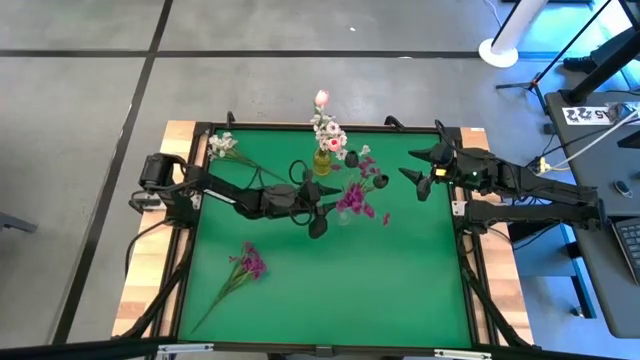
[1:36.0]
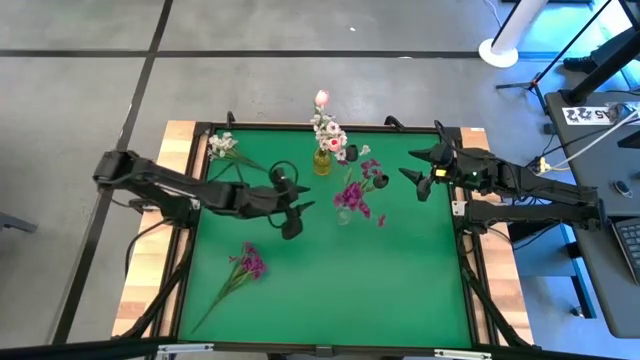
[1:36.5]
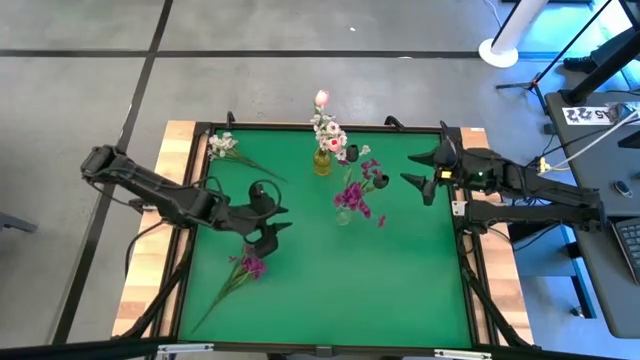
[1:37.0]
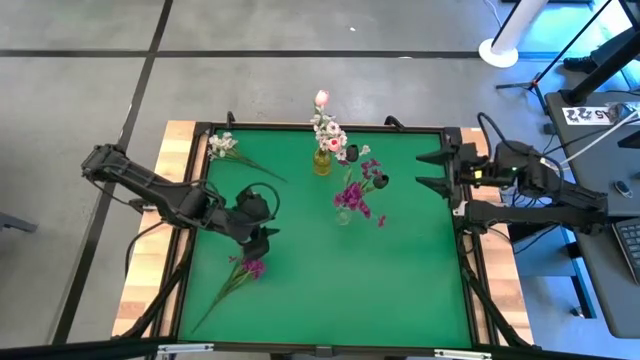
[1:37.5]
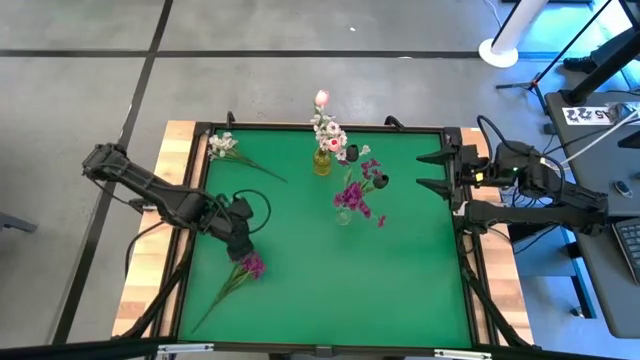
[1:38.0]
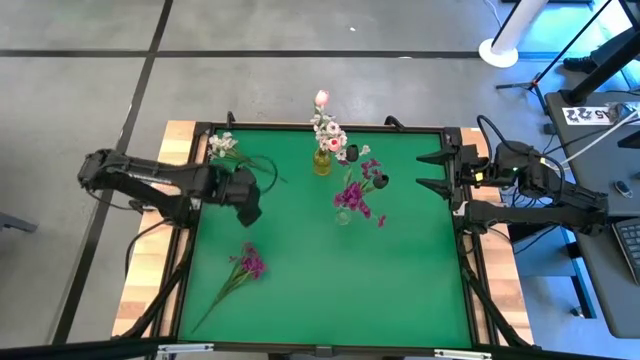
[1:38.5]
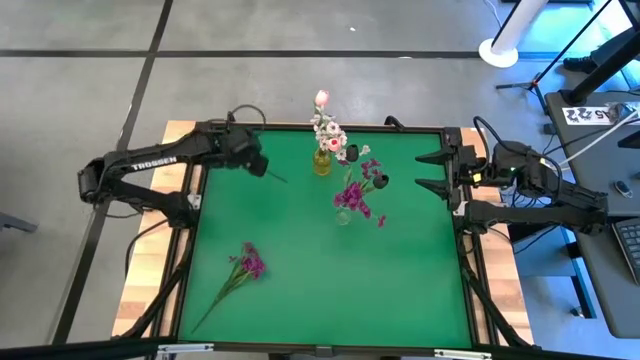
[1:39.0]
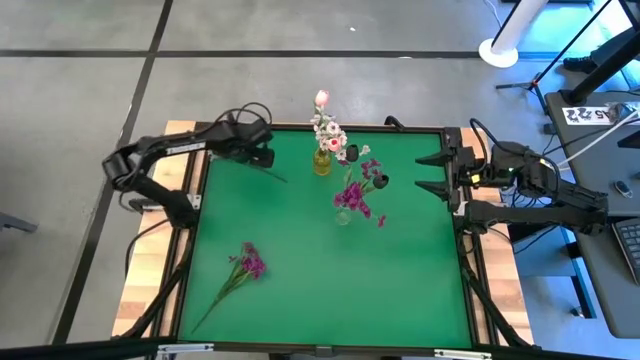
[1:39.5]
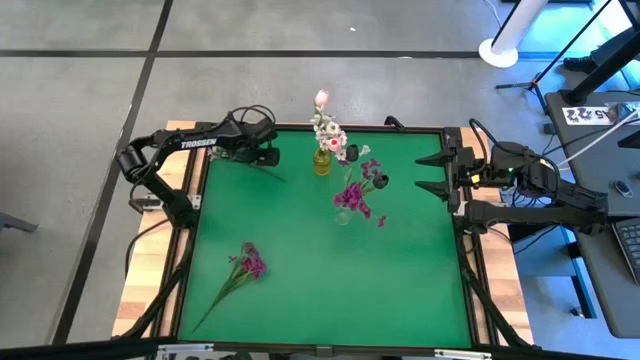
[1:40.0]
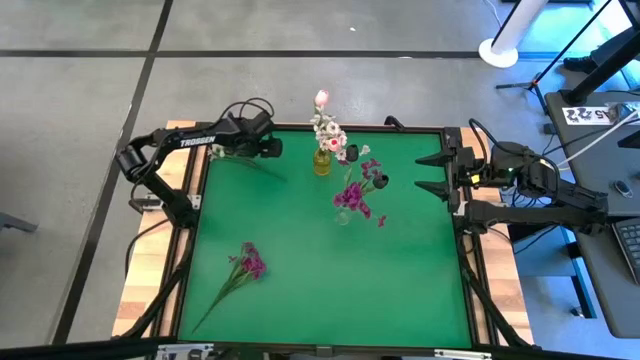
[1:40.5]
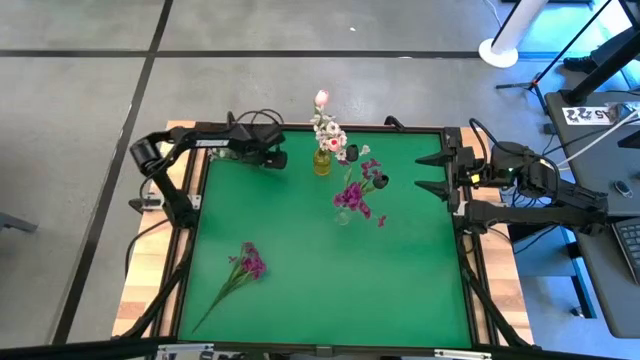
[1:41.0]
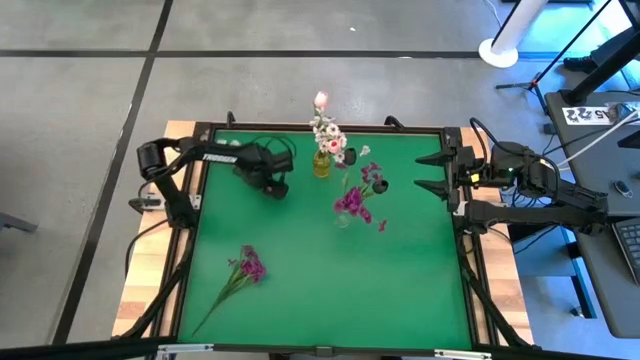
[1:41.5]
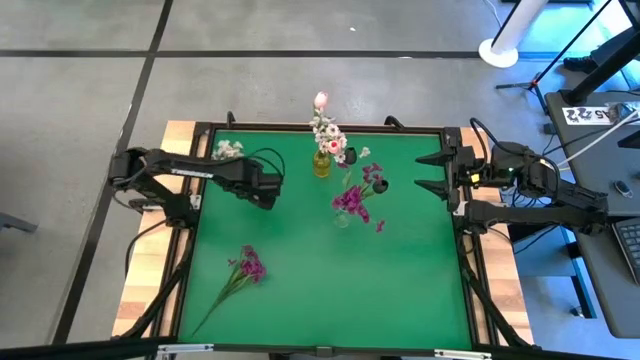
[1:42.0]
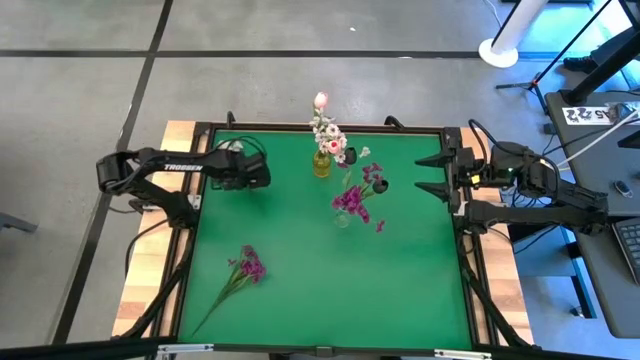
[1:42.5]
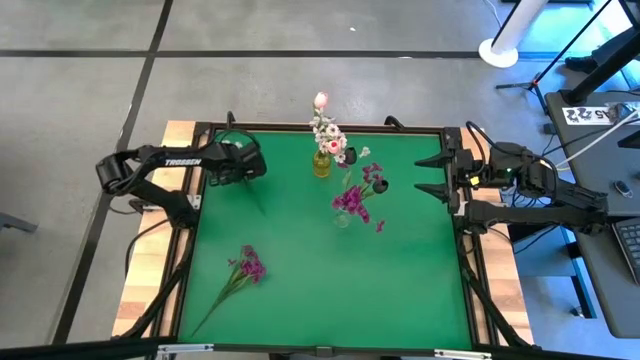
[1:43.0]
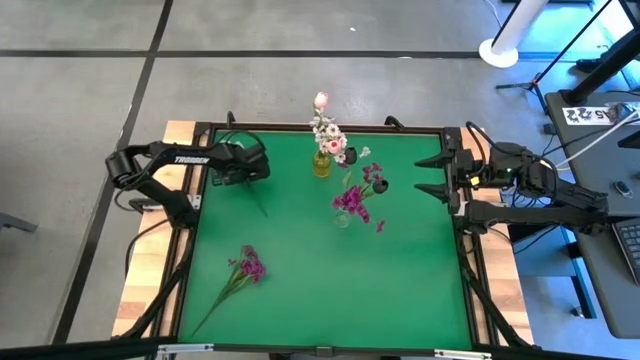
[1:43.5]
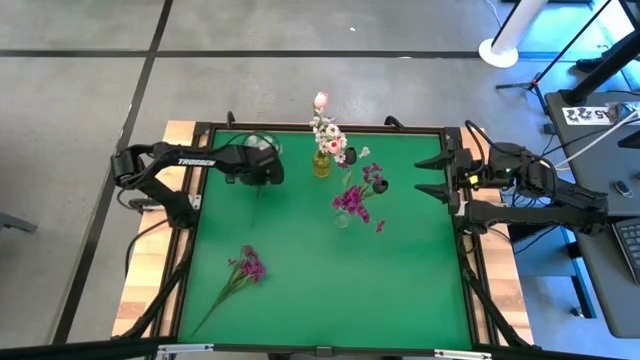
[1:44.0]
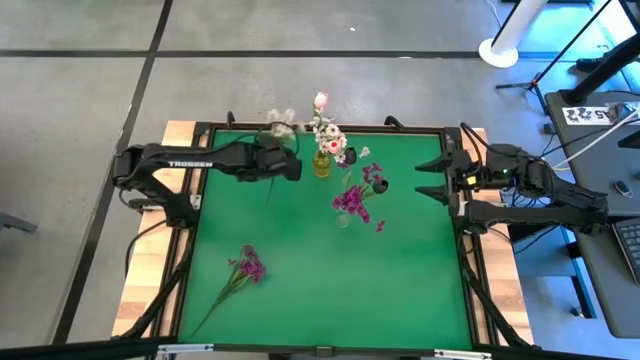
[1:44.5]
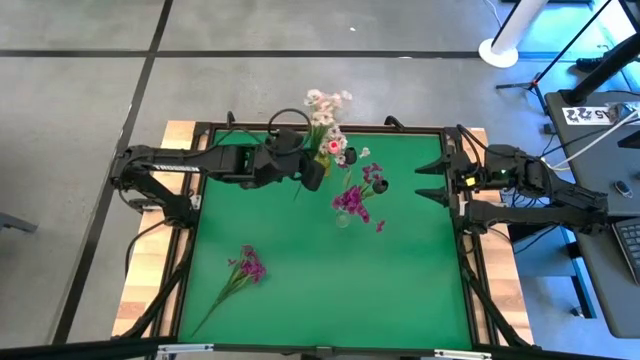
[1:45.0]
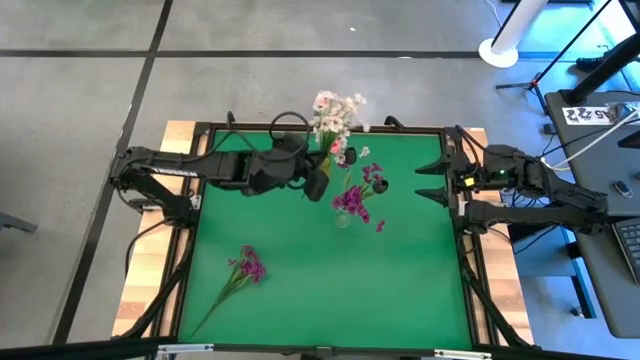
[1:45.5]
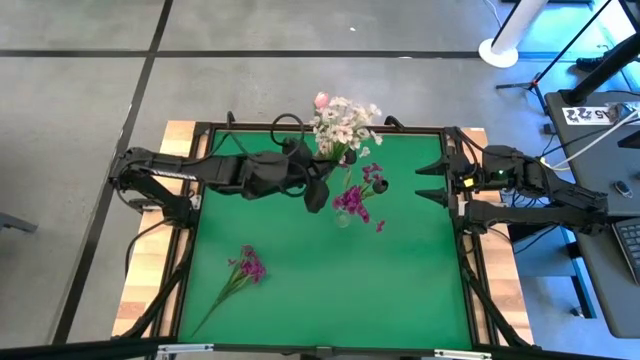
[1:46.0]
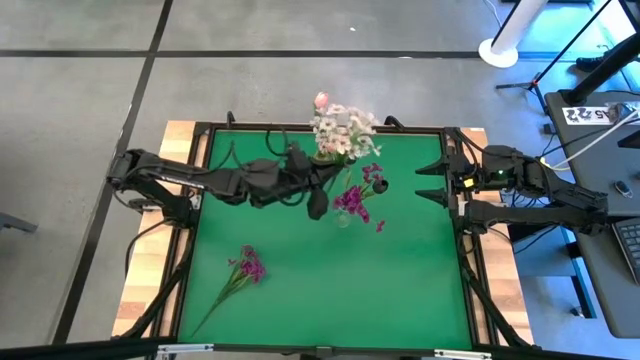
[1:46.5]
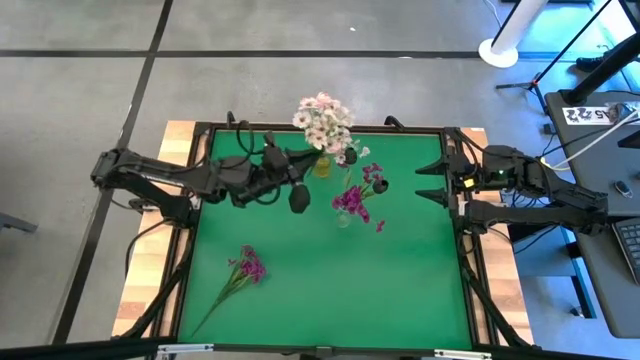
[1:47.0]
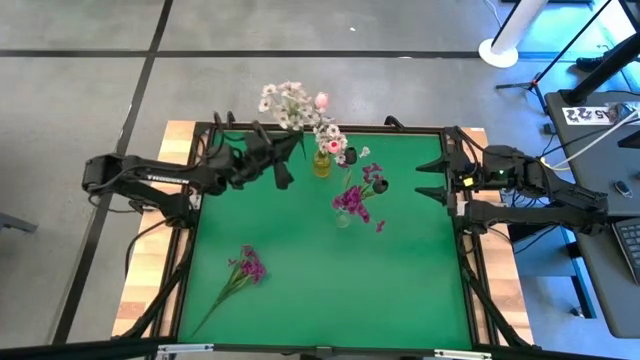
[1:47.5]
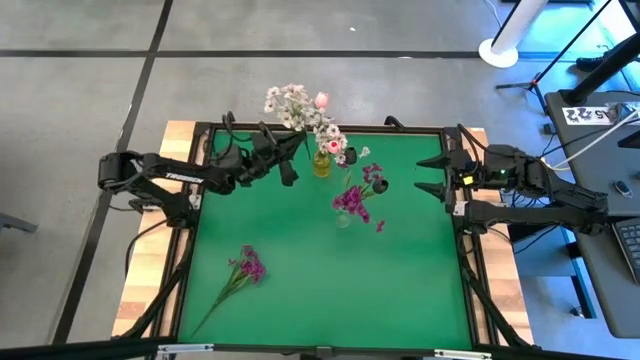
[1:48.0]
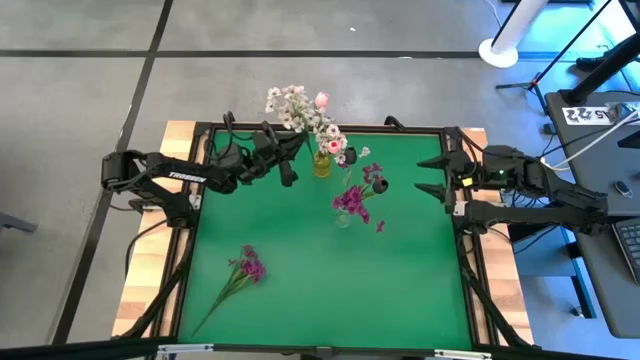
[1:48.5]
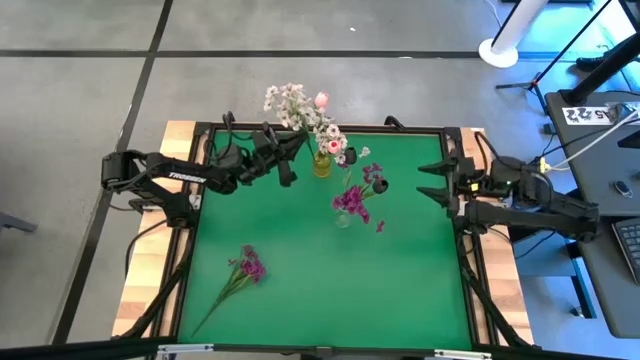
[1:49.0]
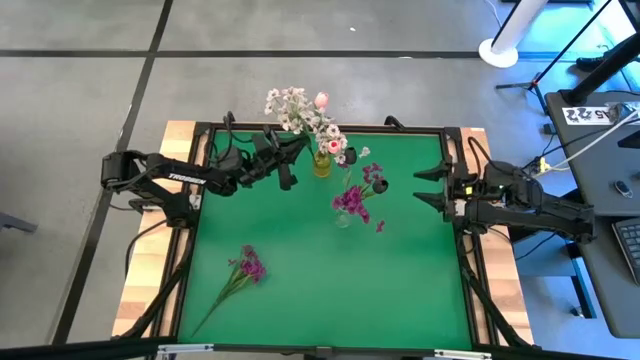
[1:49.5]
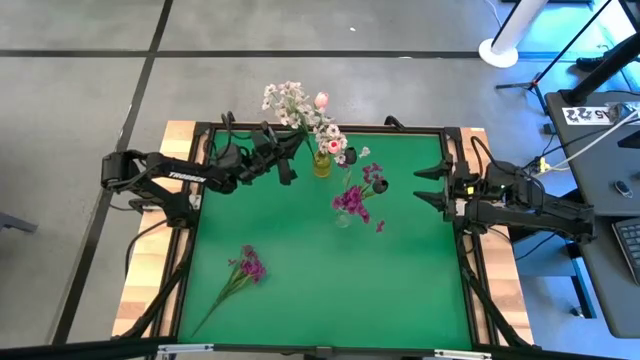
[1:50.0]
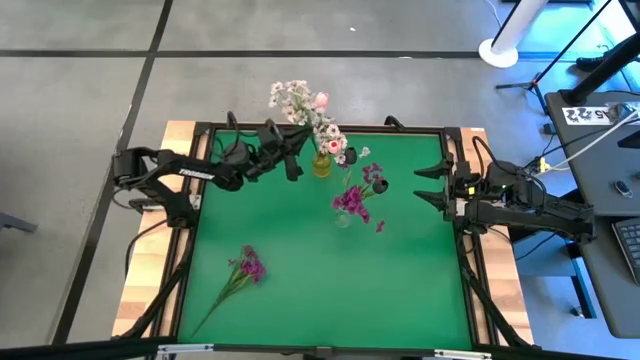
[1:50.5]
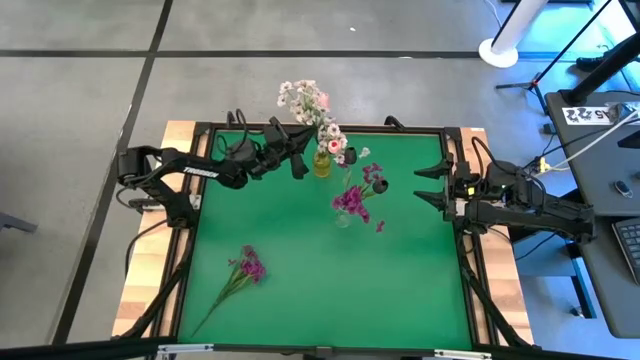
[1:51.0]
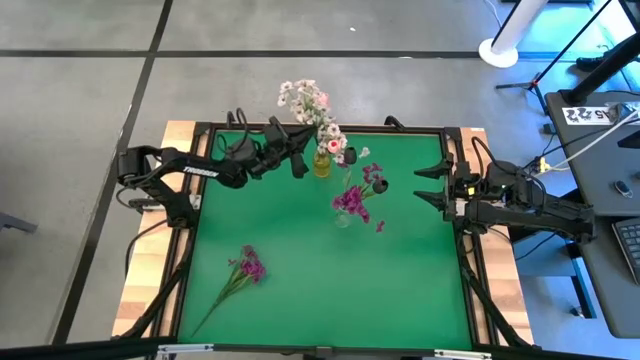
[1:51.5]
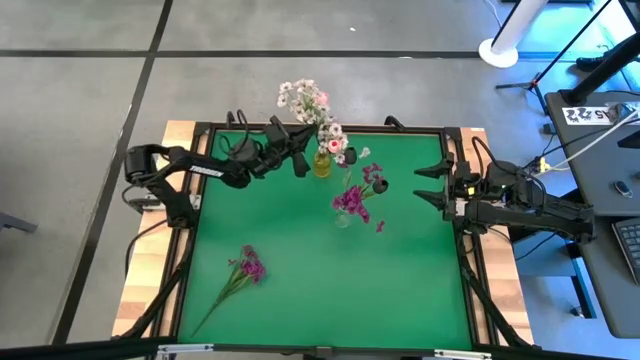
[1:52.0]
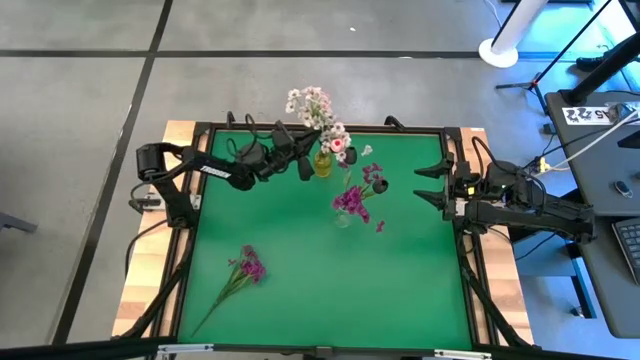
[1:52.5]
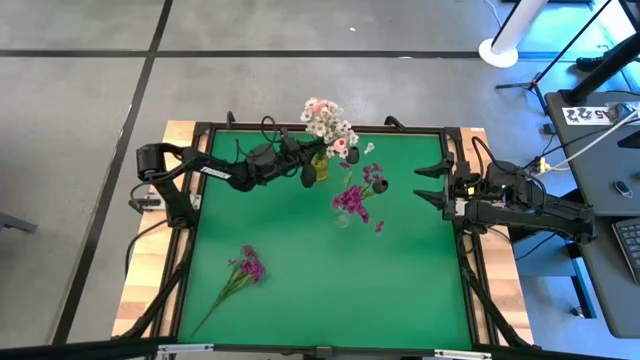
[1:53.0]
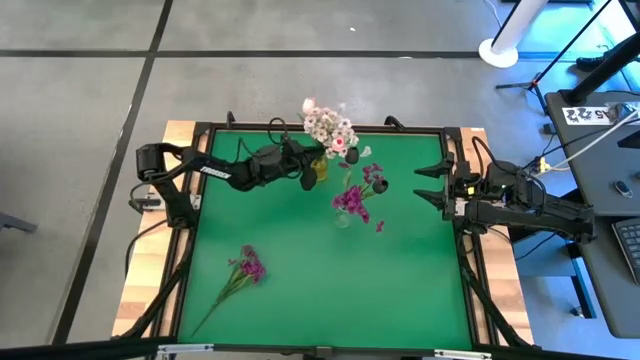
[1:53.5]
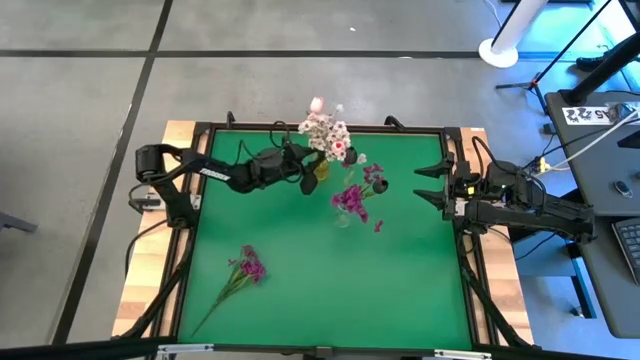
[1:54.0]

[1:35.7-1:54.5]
Task: Sort flowers into vase by color
Put the white flowers into the yellow vase

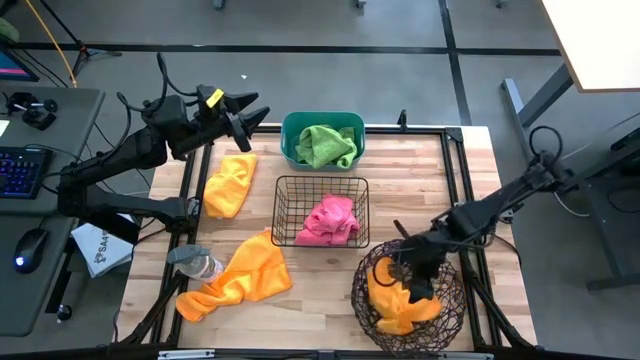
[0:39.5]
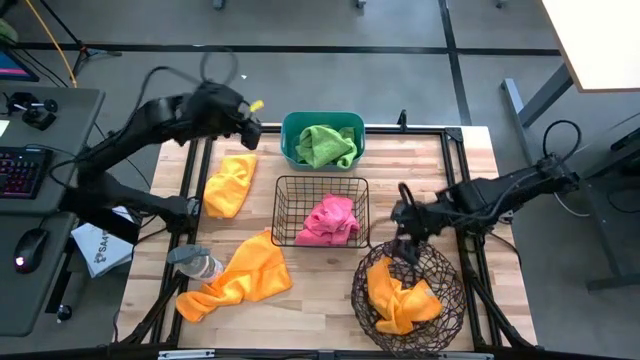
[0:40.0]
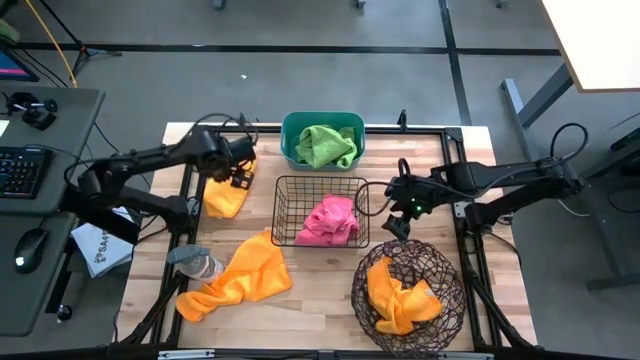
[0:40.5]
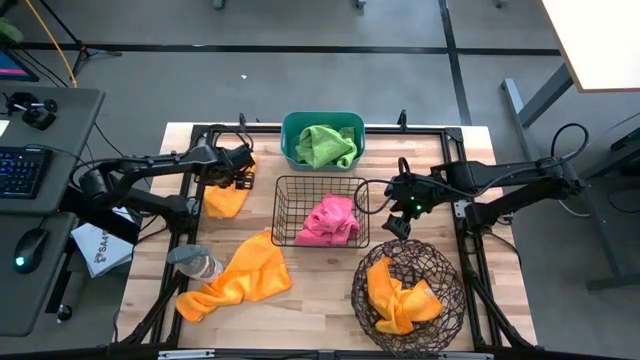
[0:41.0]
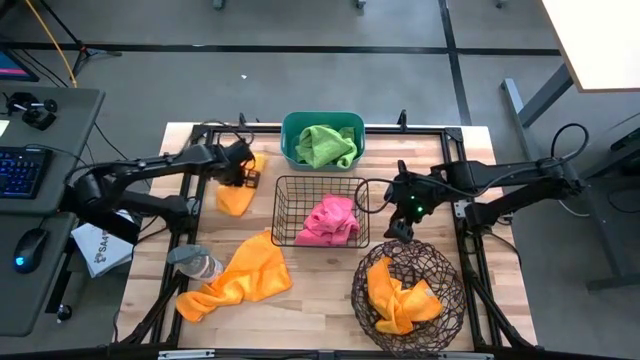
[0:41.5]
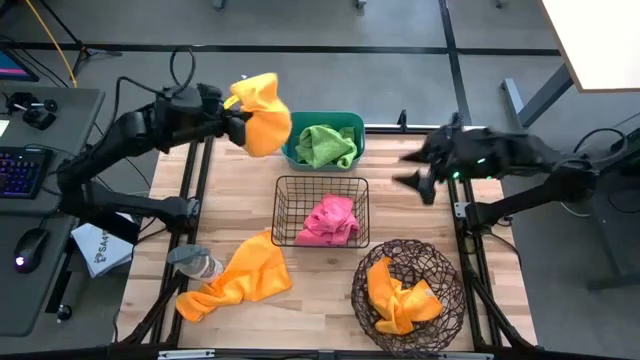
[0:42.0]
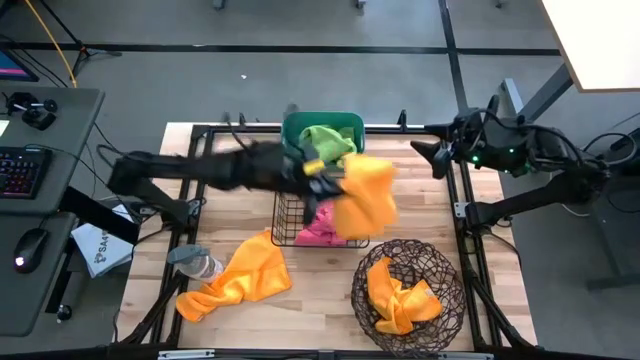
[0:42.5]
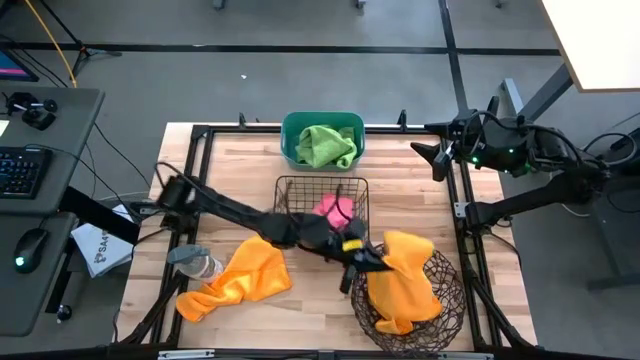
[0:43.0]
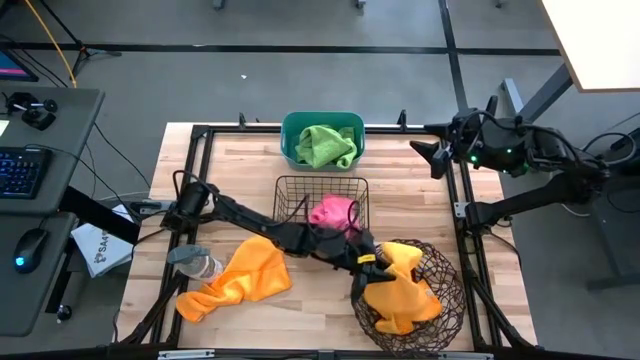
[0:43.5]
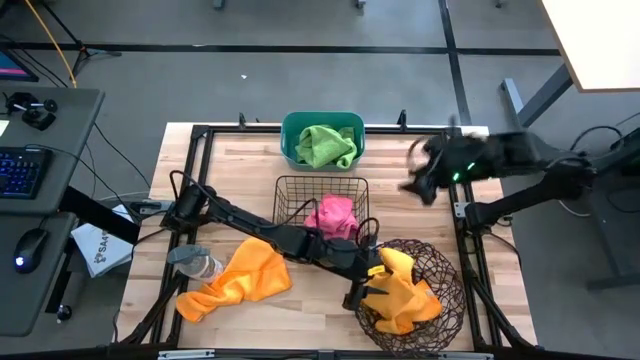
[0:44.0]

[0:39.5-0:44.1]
Task: Sort microfiber towel by color & place in baskets
Put the top yellow microfiber cloth into the spiral wire basket
